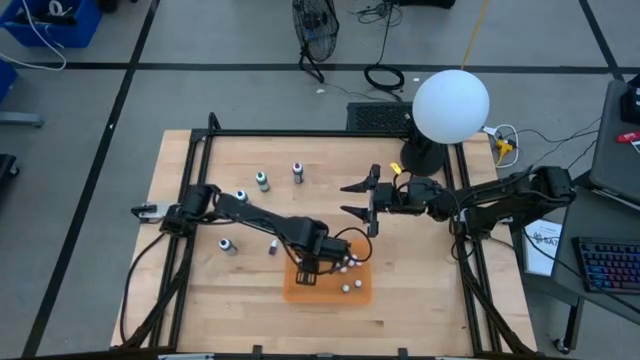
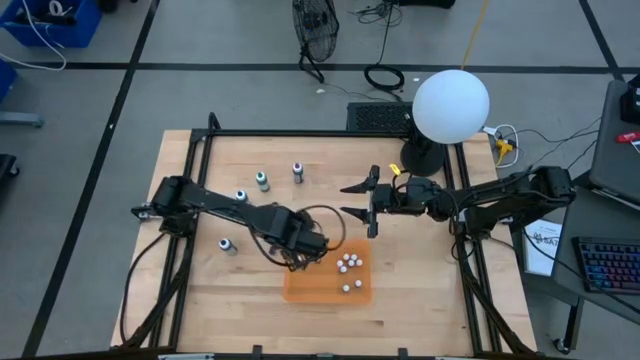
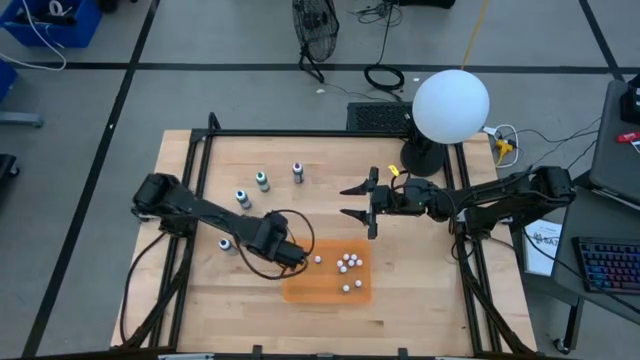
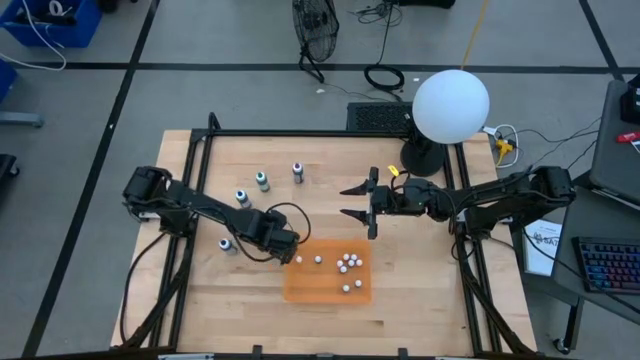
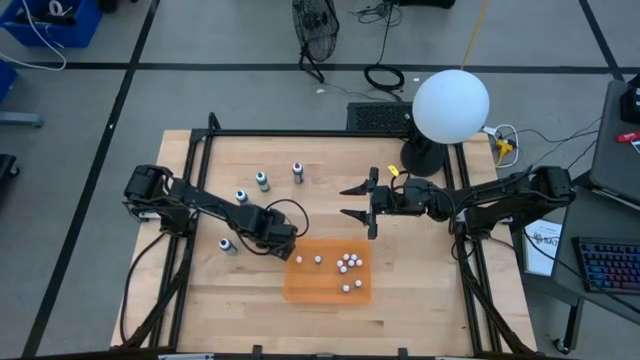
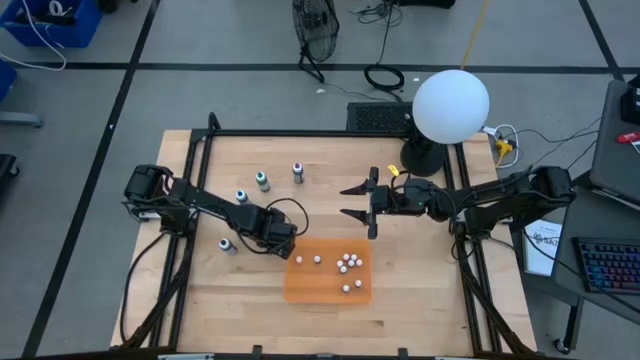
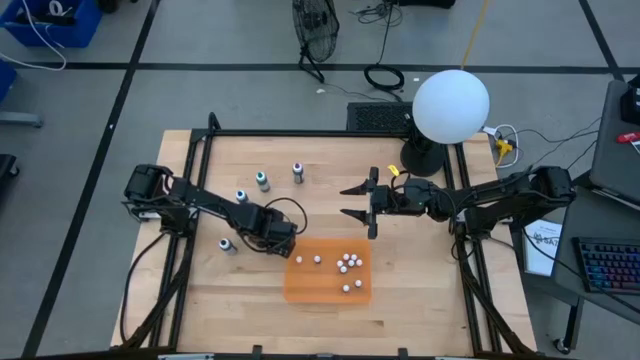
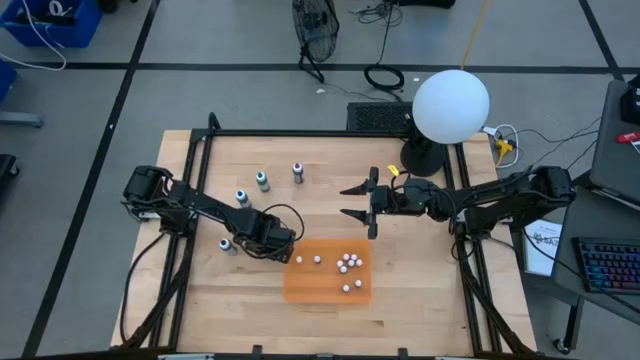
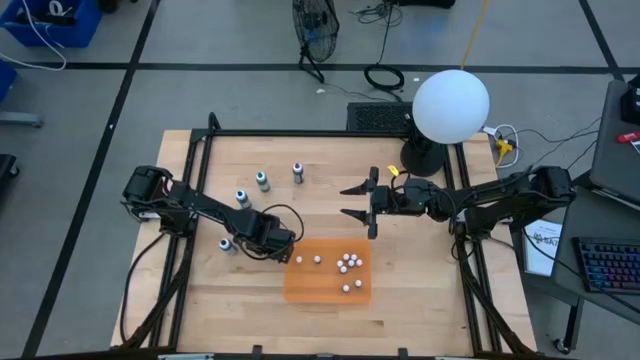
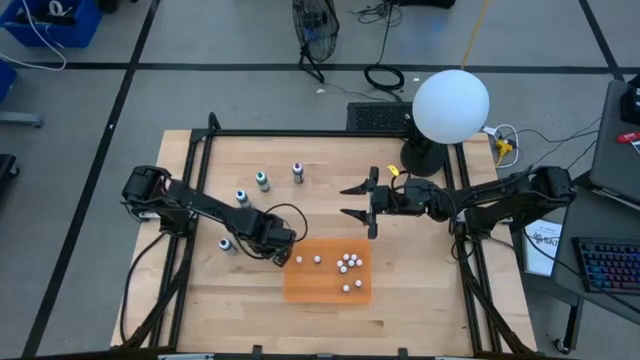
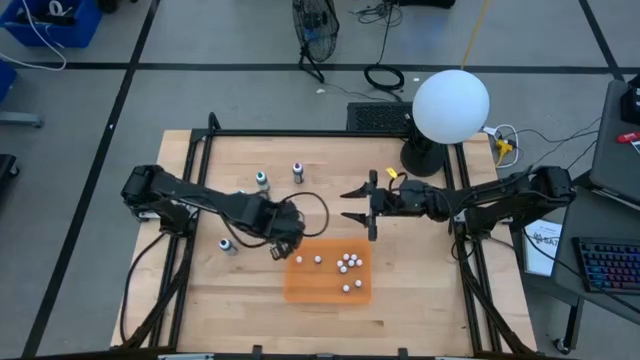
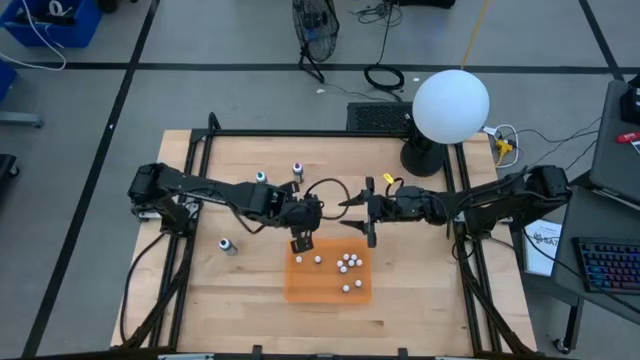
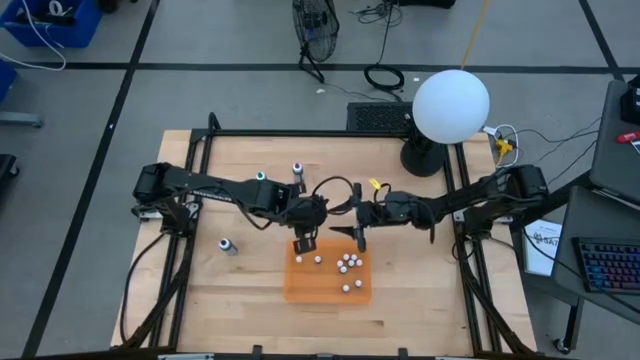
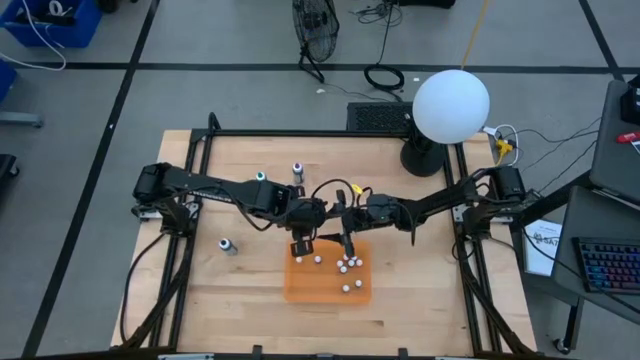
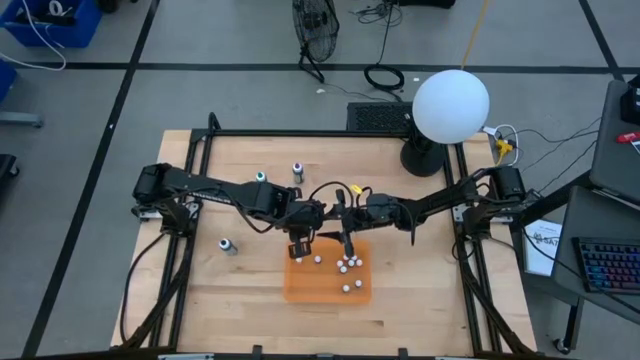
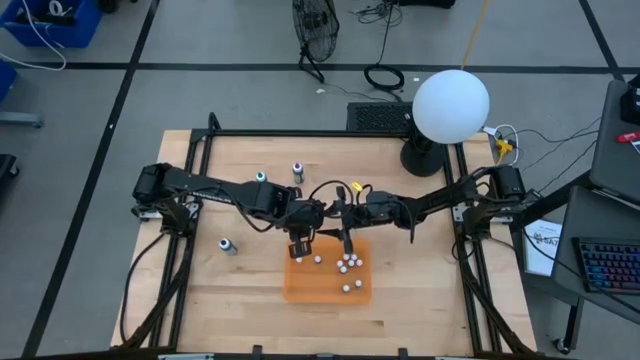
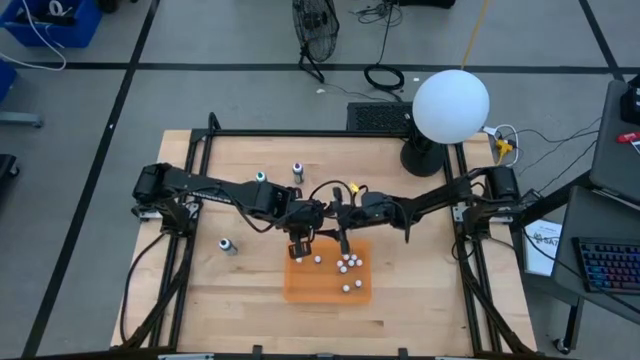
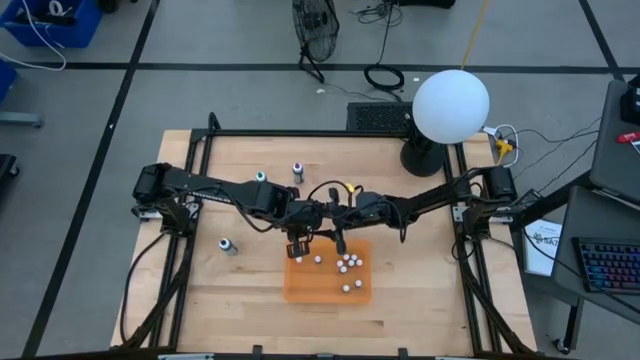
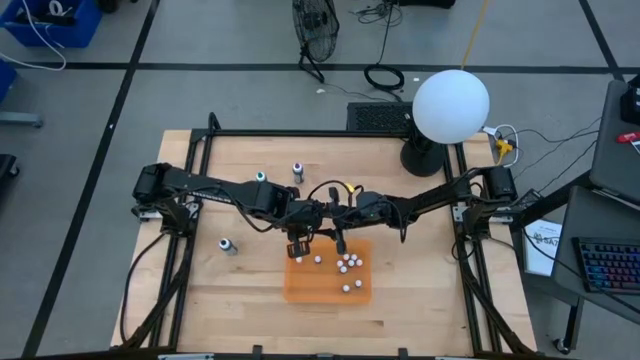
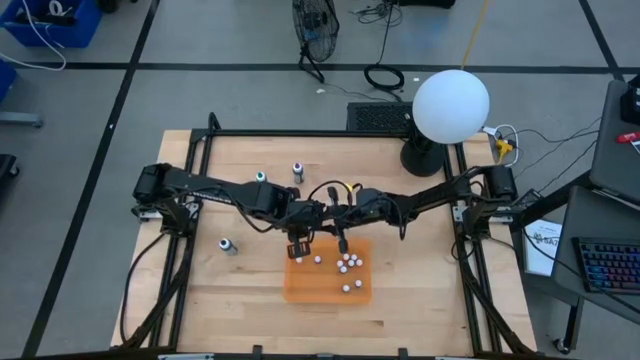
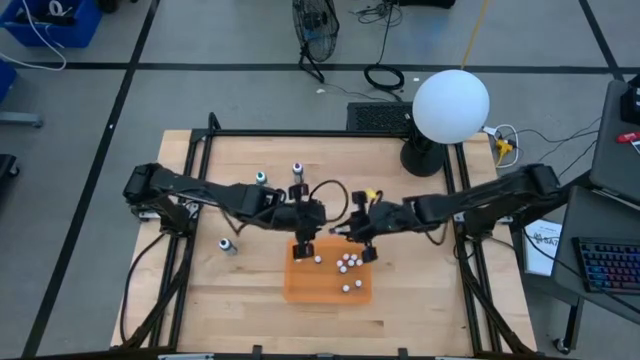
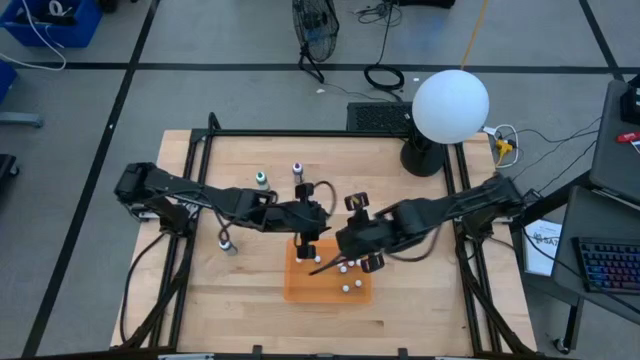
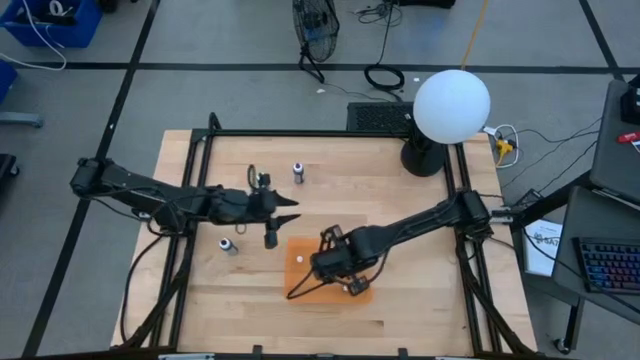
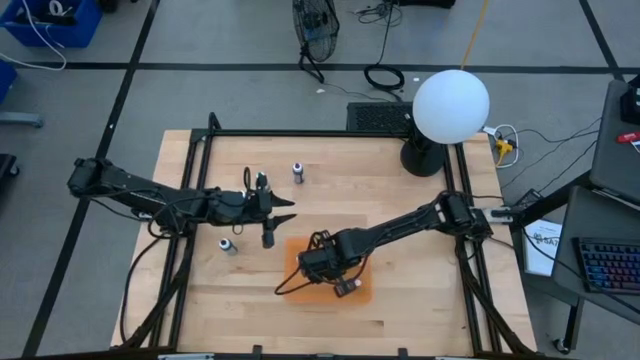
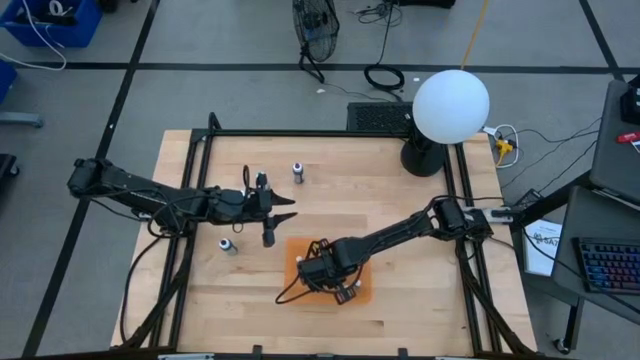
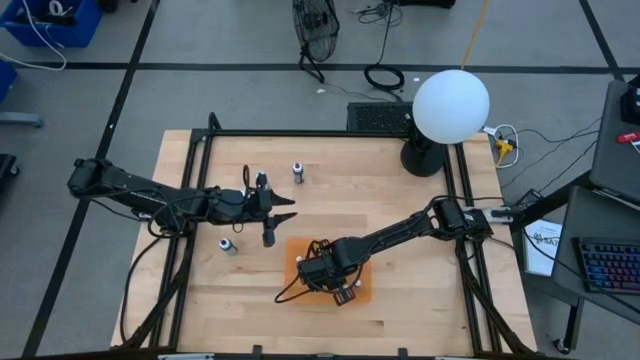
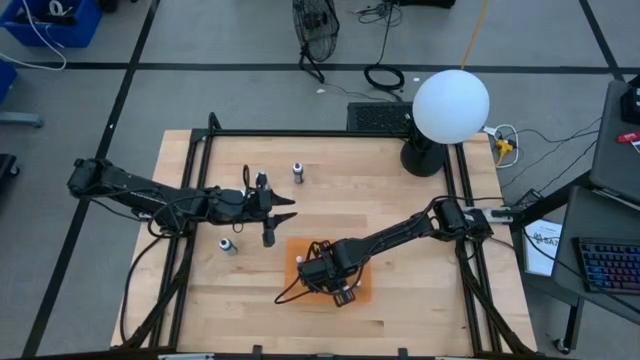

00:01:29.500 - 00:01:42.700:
Task: Pick & Place food coloring
Put the small purple food coloring bottle into the orange bin

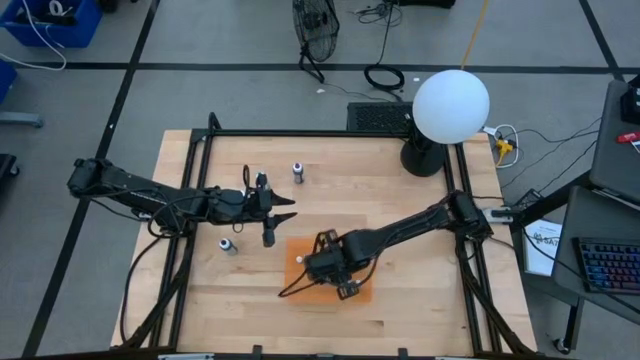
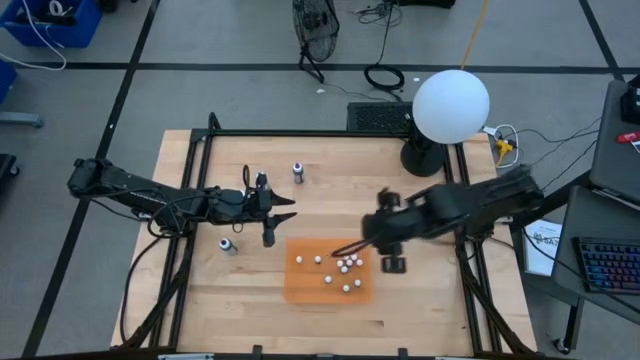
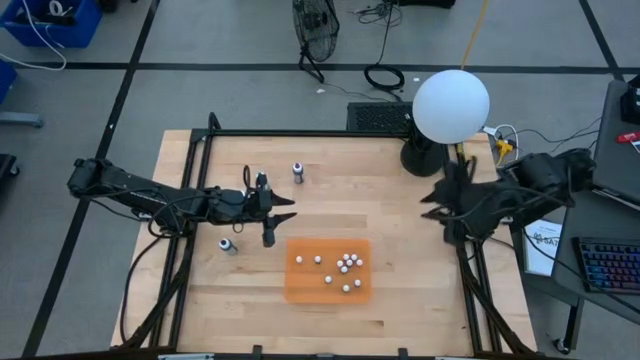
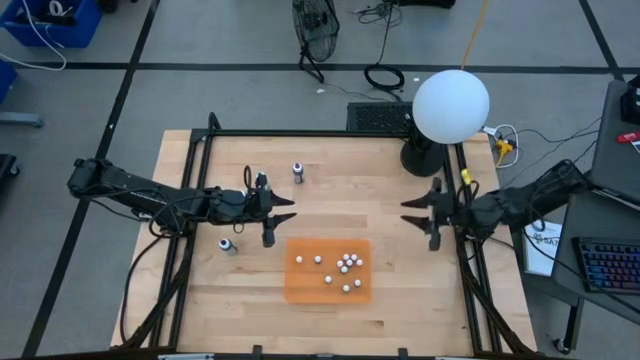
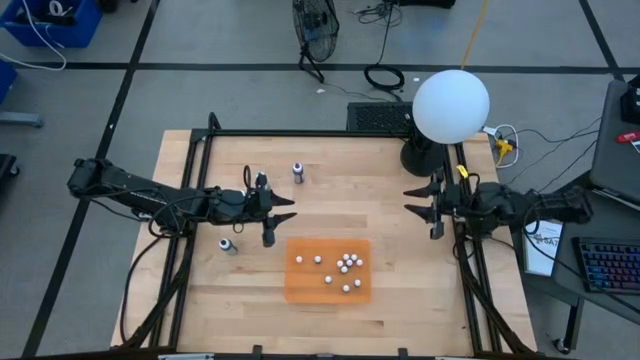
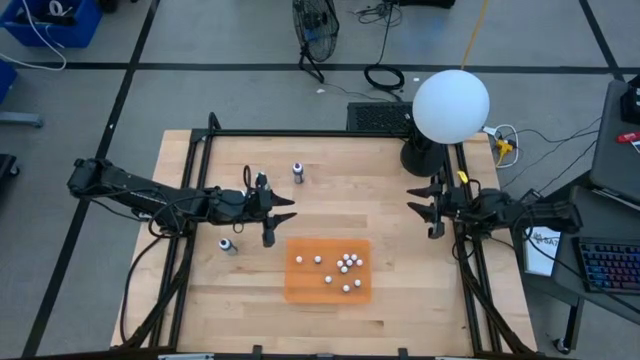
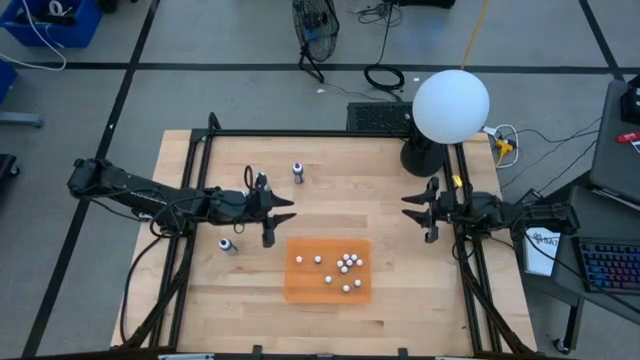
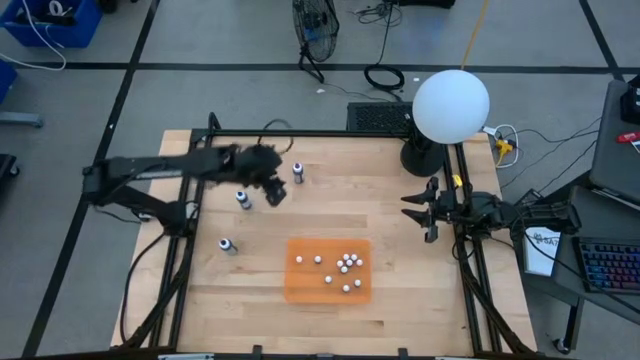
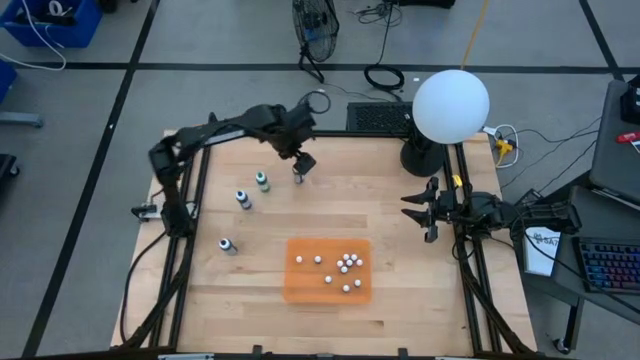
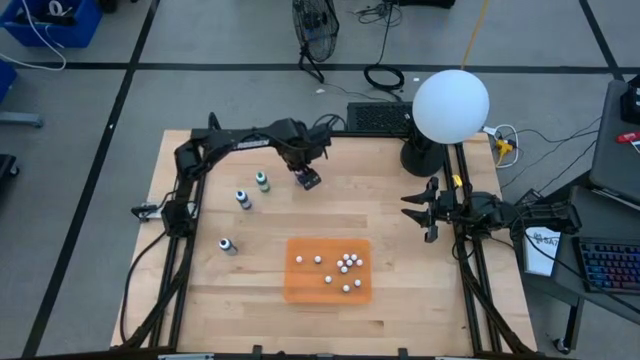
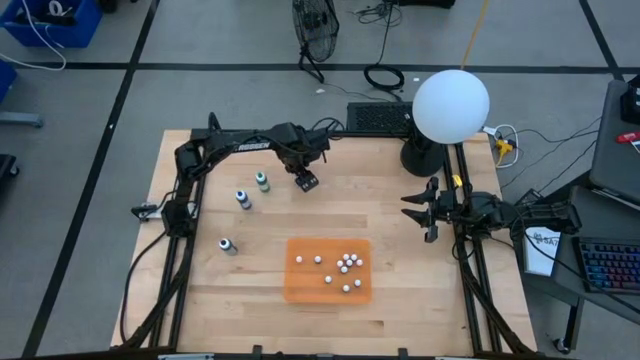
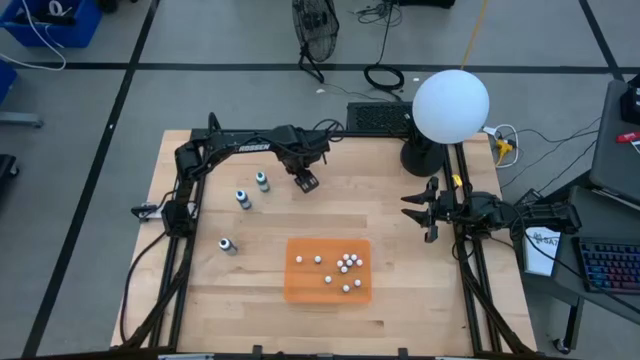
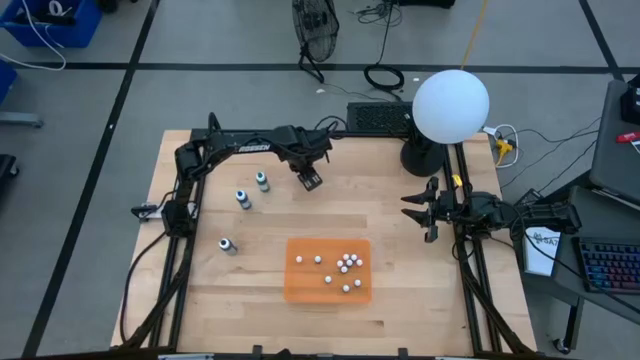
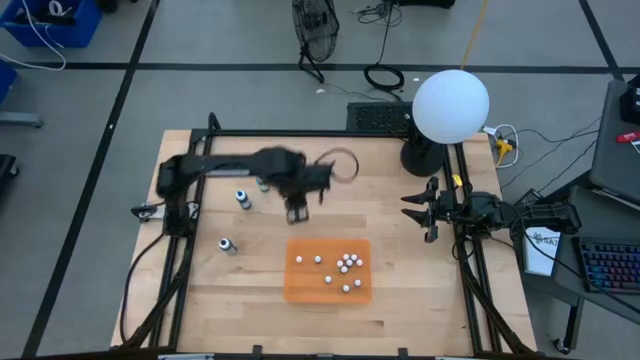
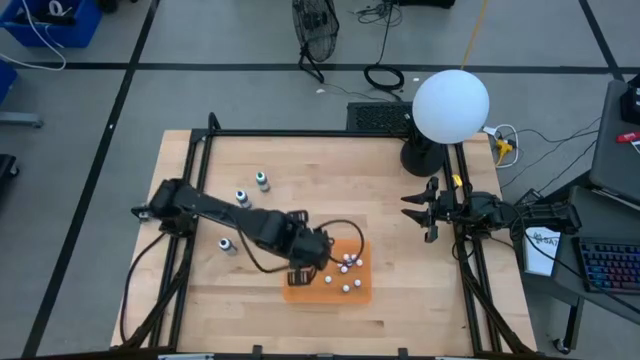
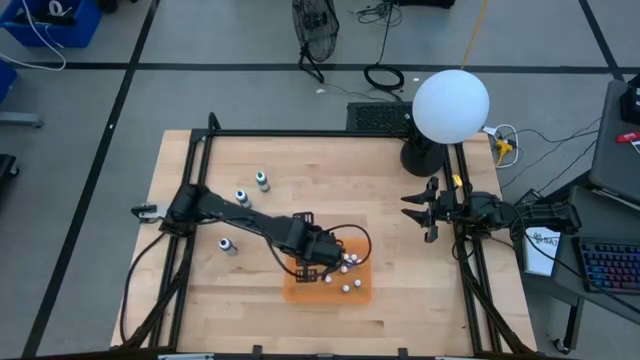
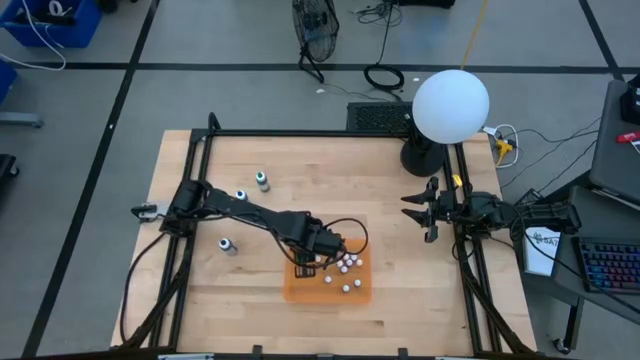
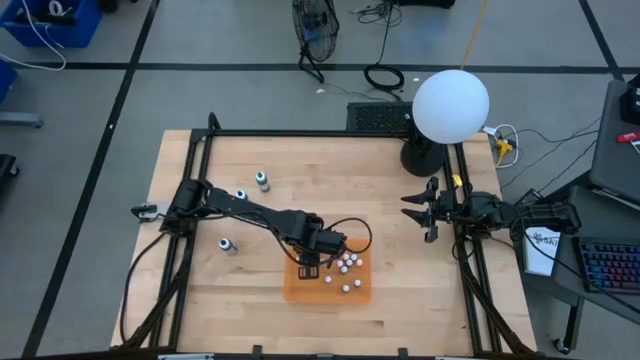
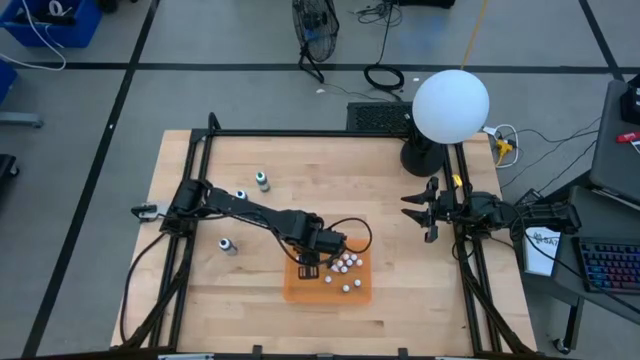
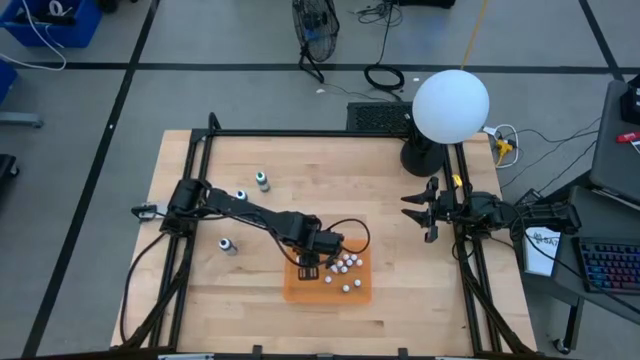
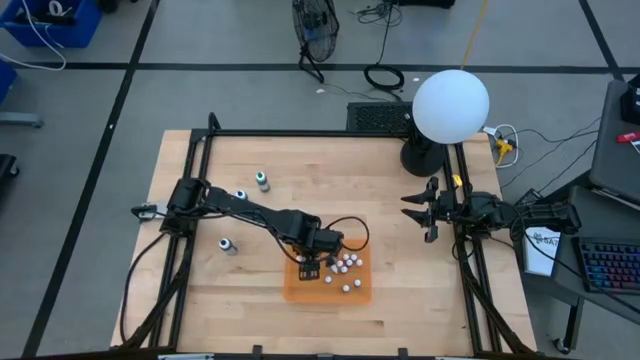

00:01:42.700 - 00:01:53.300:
Put the large purple food coloring bottle into the orange bin
